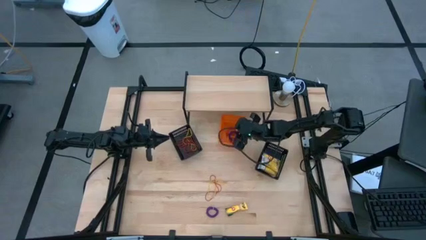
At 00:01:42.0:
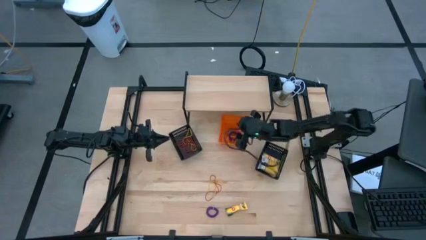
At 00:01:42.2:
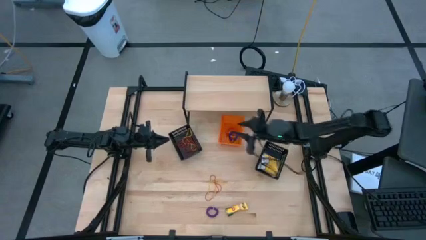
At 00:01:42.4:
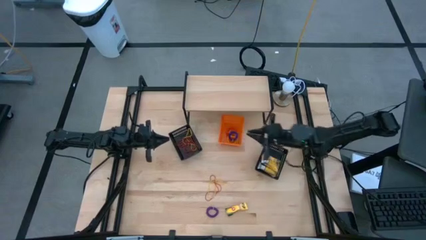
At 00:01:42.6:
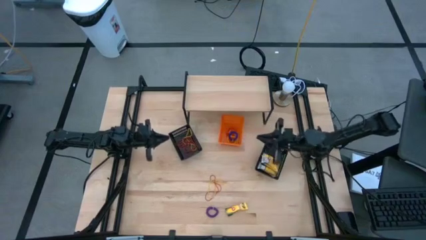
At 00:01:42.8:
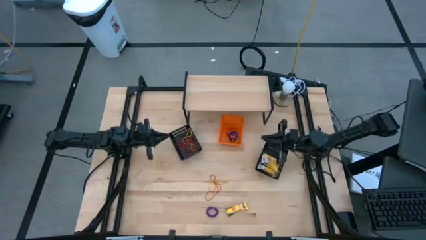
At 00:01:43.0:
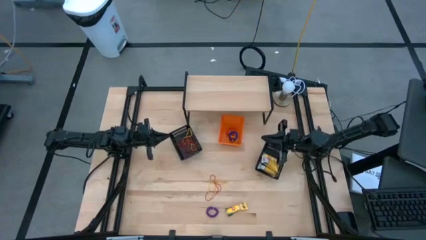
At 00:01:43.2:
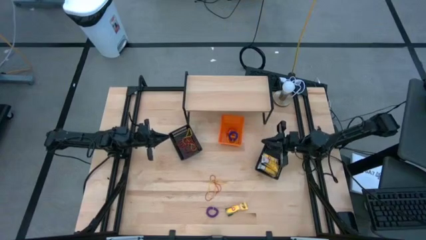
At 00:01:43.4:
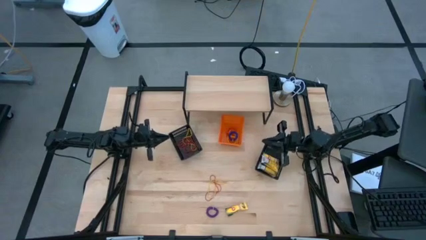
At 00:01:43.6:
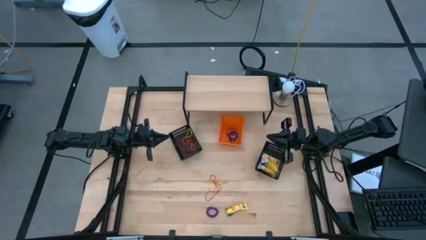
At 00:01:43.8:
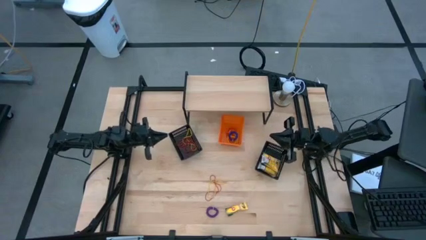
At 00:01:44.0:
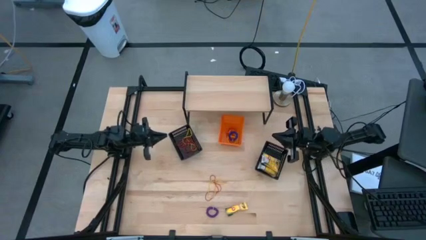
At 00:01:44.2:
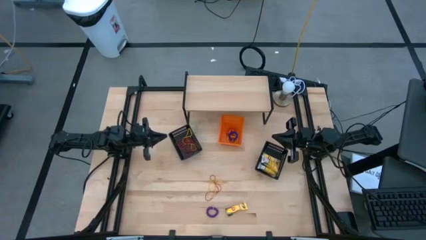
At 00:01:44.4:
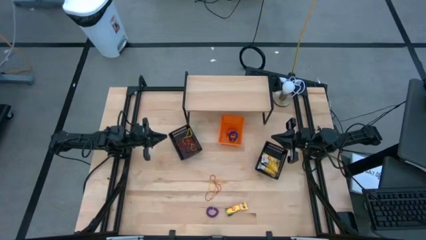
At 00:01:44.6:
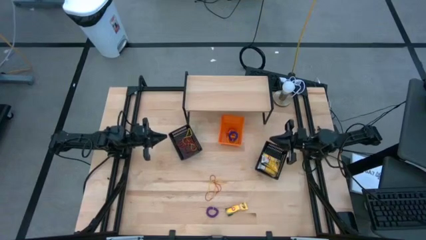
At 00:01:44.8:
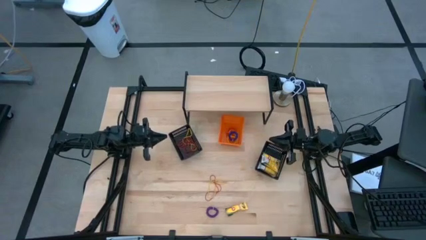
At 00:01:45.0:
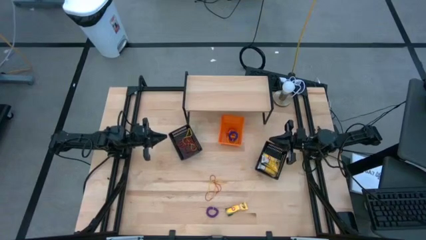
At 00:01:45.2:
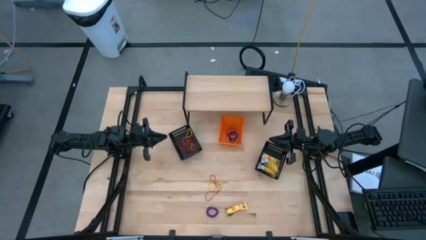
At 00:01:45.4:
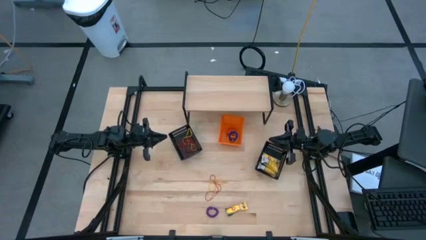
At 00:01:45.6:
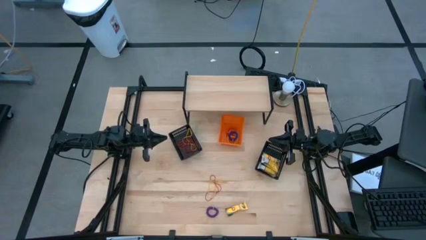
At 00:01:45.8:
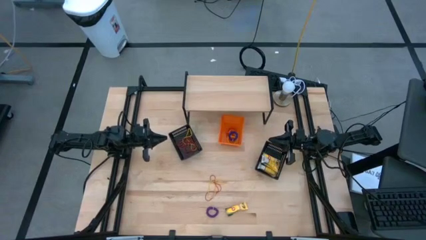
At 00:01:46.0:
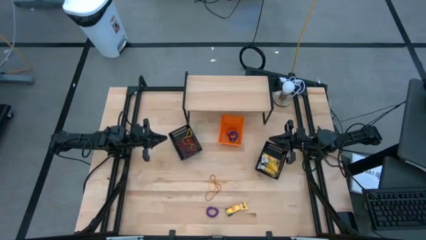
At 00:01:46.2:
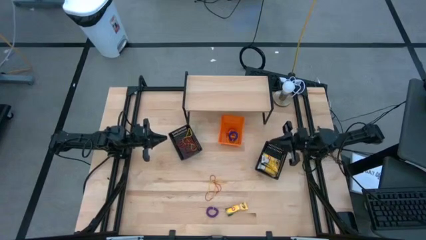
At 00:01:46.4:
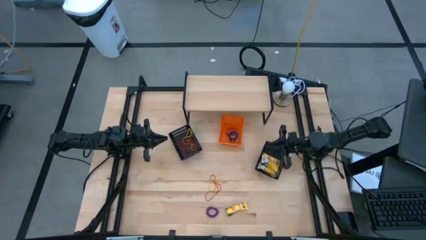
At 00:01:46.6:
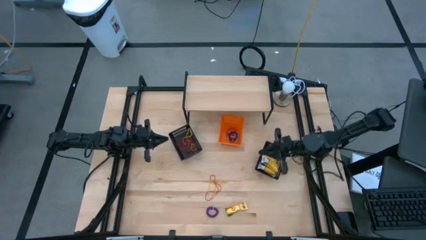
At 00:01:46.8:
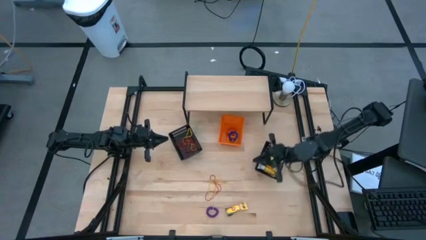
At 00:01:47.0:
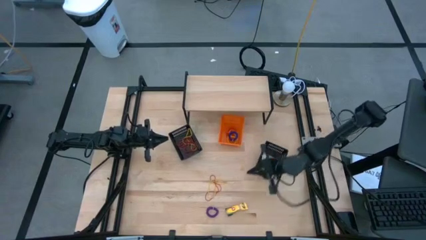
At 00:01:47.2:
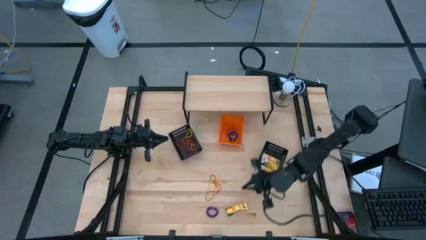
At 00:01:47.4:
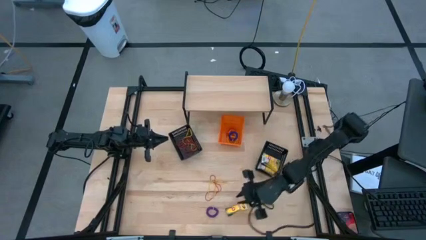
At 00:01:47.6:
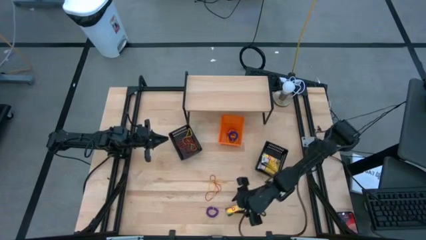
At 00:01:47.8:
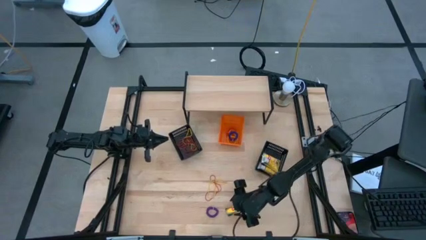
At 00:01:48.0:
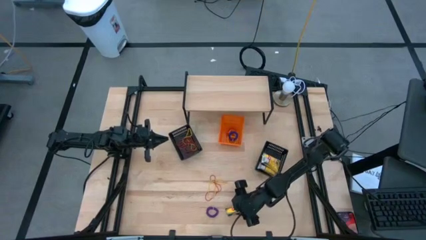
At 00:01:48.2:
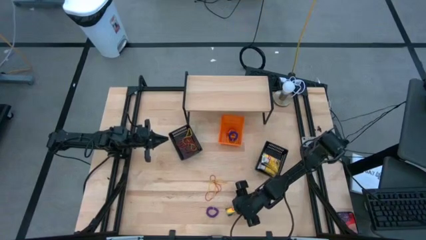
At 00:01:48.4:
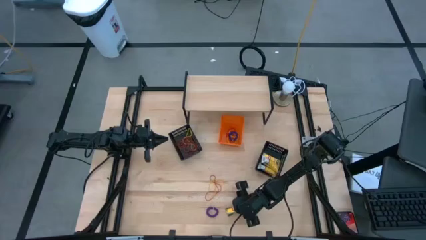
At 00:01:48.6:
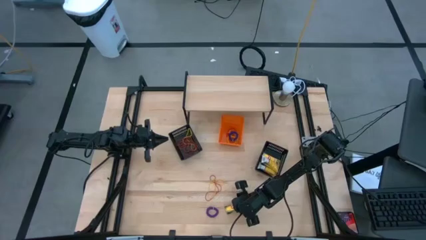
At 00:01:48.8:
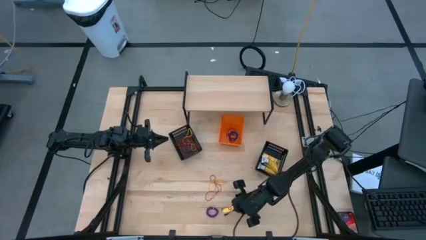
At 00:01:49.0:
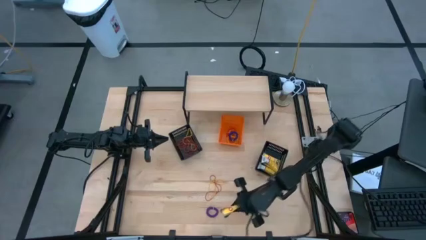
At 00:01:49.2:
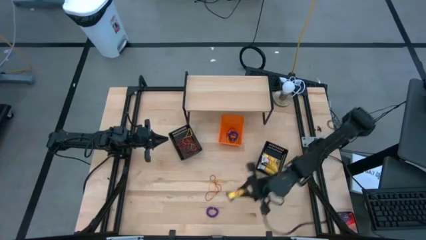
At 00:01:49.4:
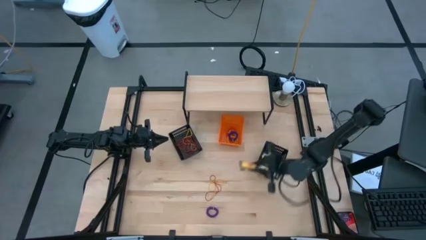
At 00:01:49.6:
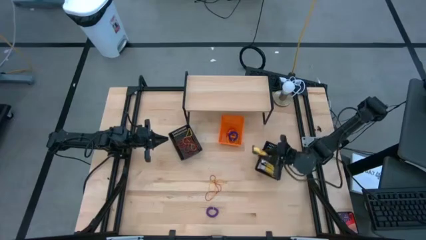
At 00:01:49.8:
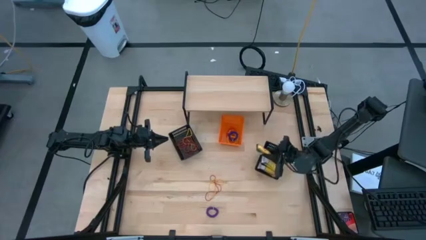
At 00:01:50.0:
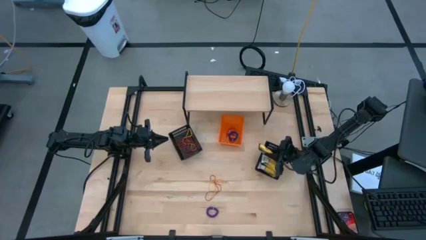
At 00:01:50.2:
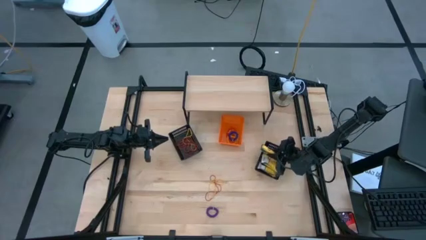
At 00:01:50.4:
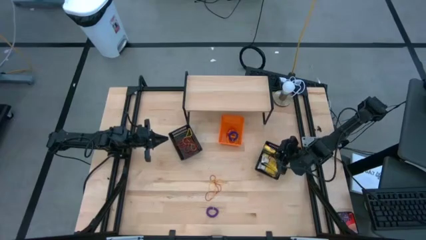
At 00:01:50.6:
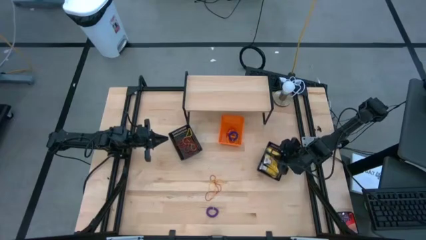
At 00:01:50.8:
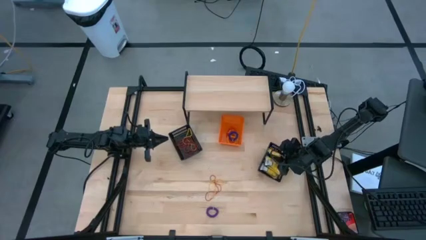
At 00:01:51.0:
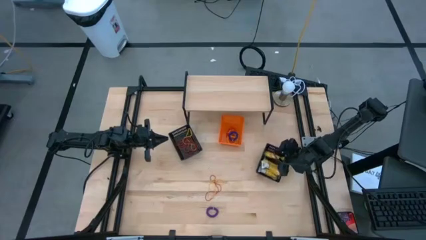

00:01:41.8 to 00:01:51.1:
Task: Pick & Place Office Desk Supplies
Put the crayon box into the right black bin
